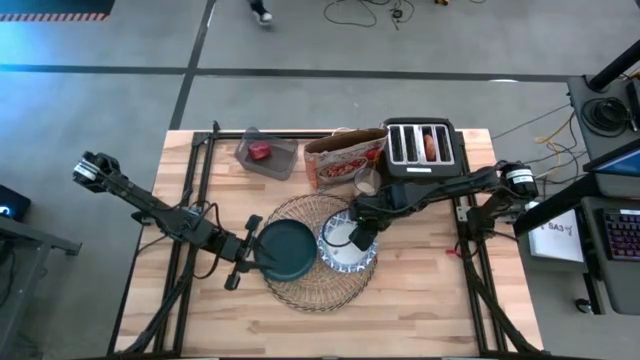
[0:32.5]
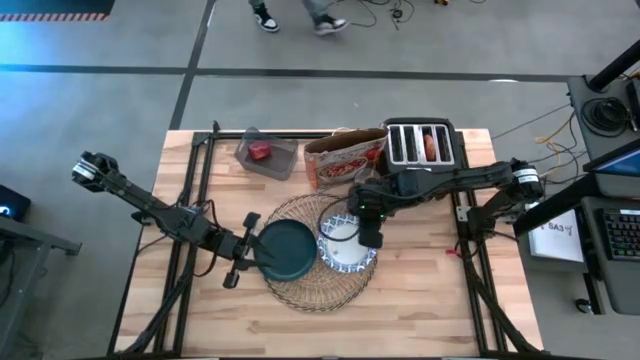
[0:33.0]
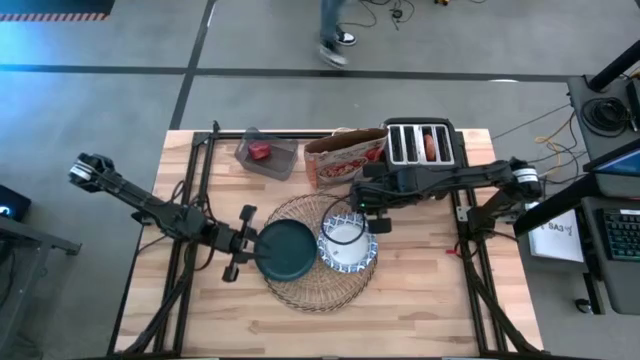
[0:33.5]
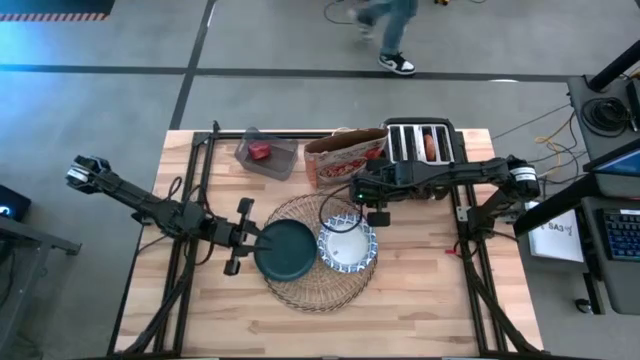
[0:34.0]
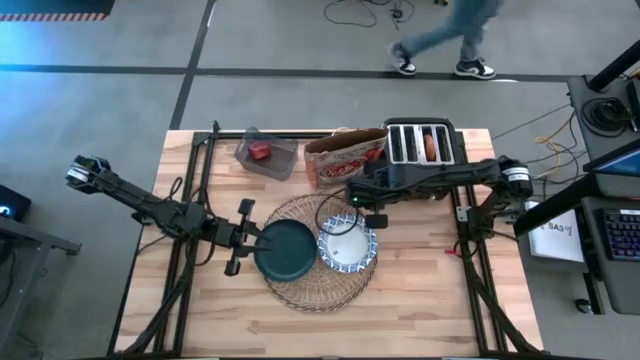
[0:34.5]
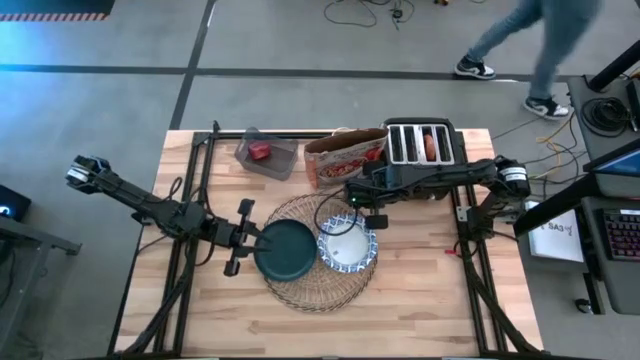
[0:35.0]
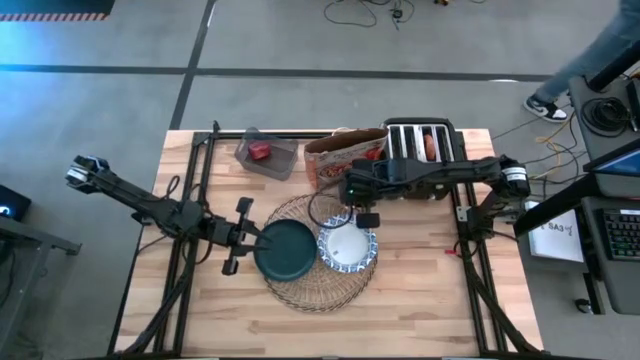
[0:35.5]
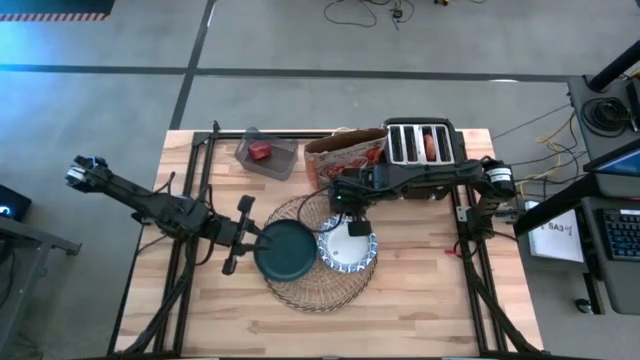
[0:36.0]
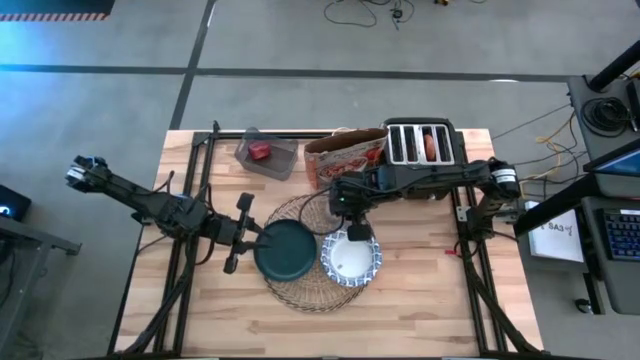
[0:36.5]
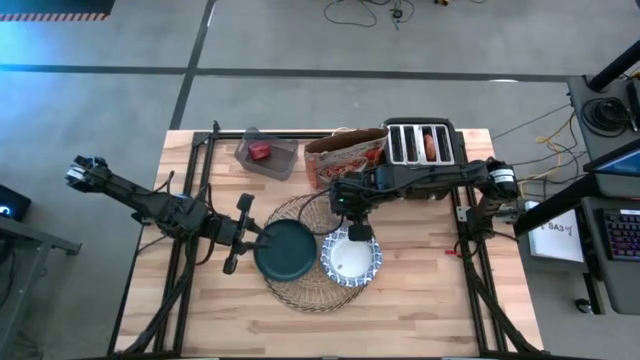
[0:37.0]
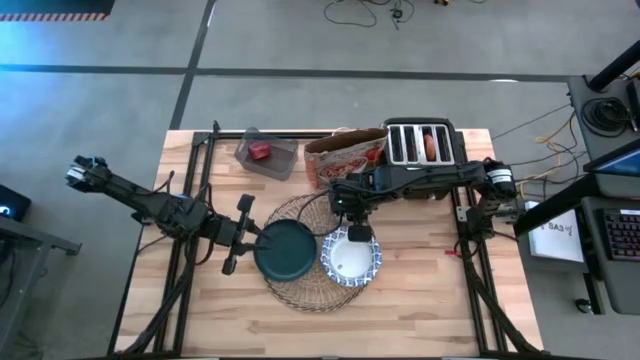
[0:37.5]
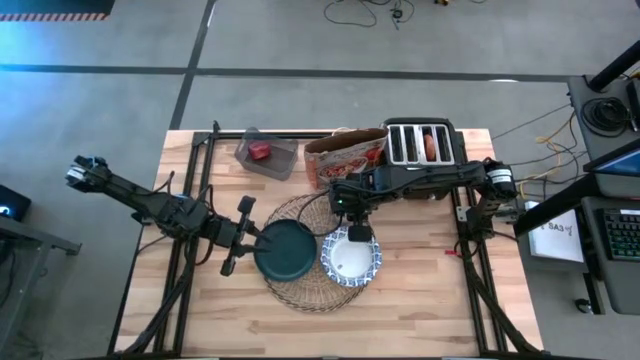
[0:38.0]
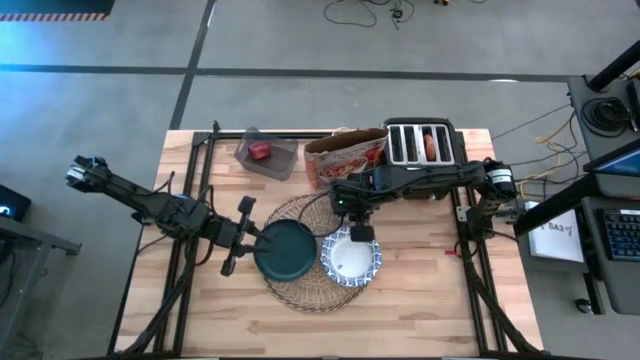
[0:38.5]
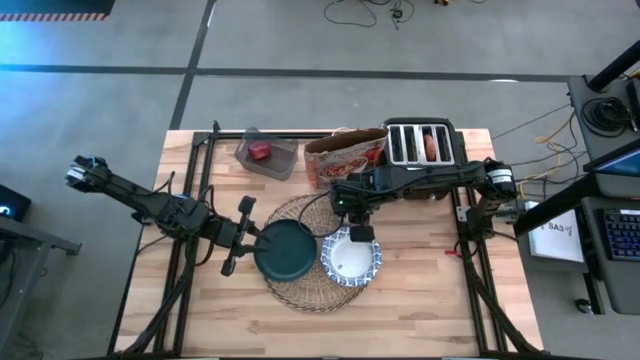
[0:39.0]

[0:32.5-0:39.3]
Task: Arrange a breakfast setting
Put the transparent cup on the brown table mat

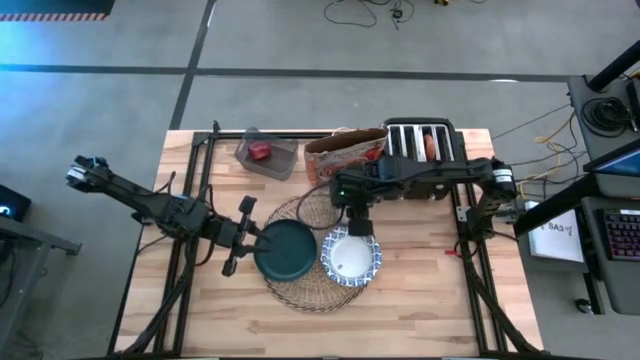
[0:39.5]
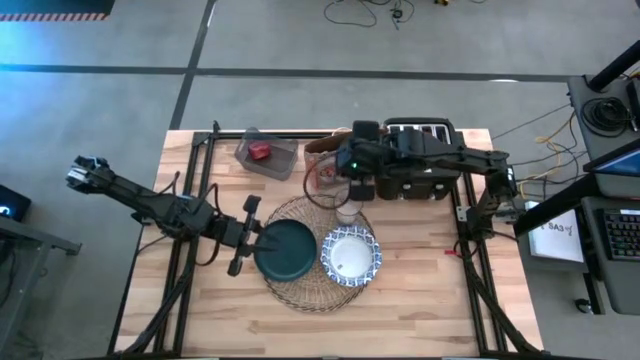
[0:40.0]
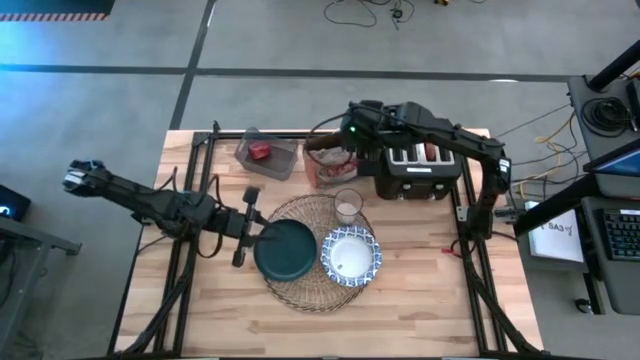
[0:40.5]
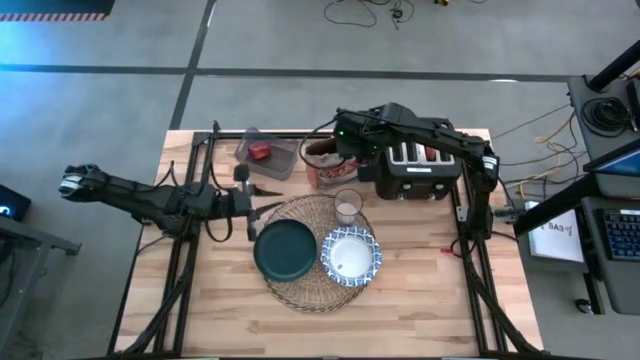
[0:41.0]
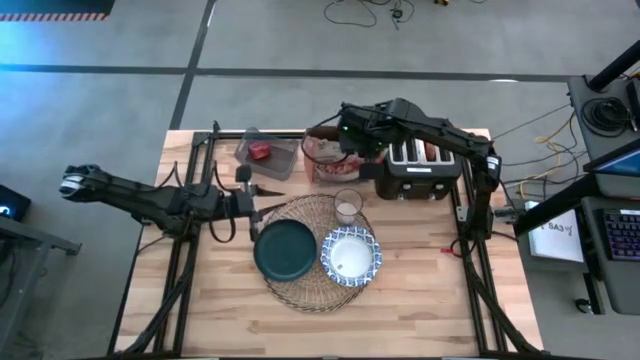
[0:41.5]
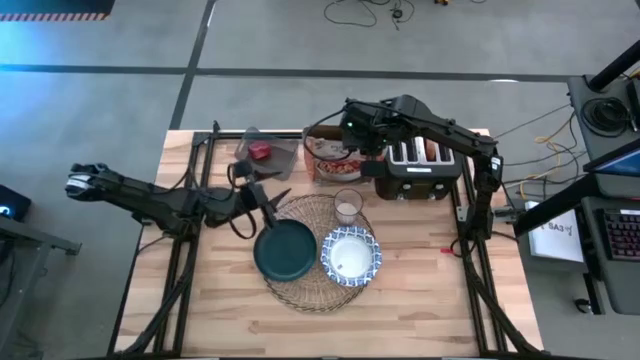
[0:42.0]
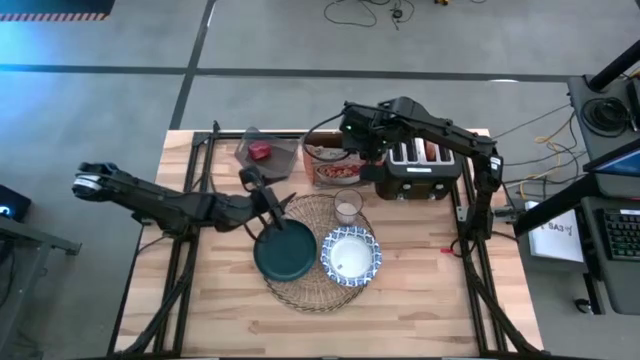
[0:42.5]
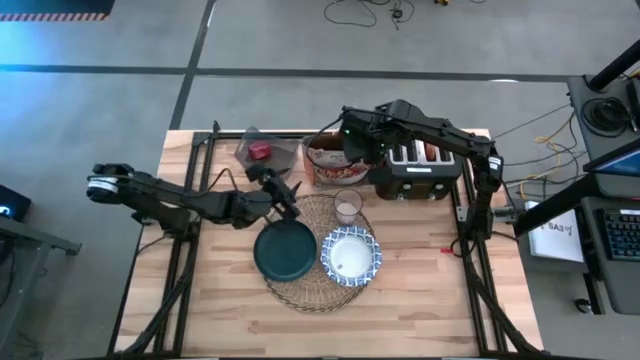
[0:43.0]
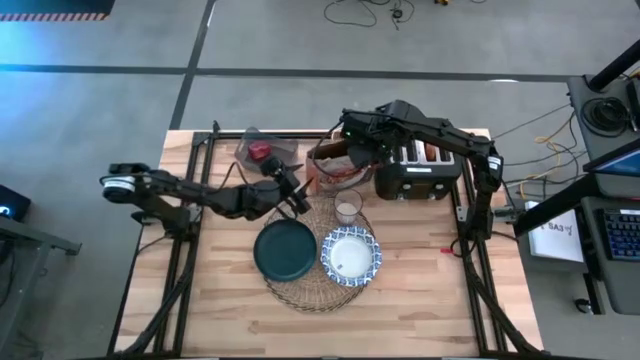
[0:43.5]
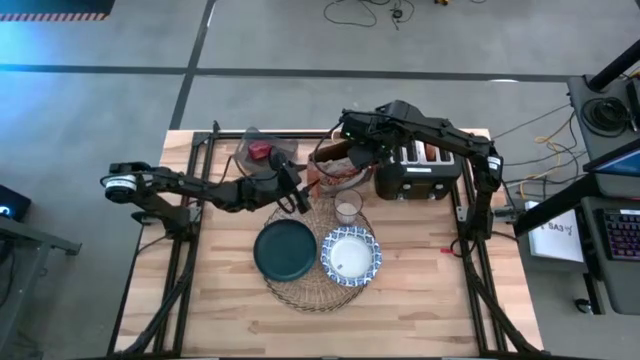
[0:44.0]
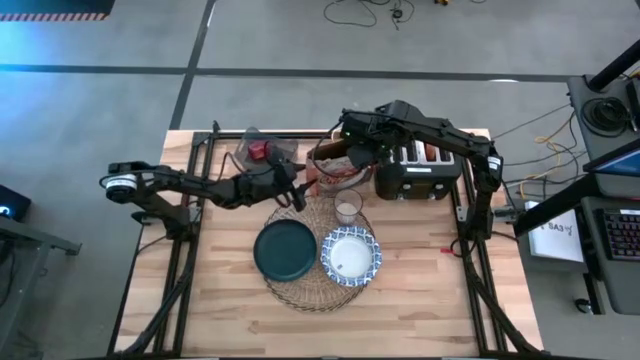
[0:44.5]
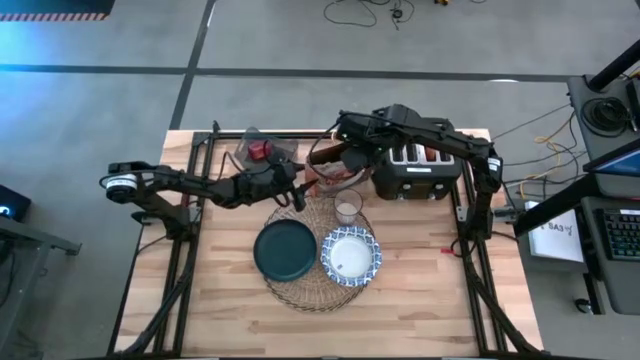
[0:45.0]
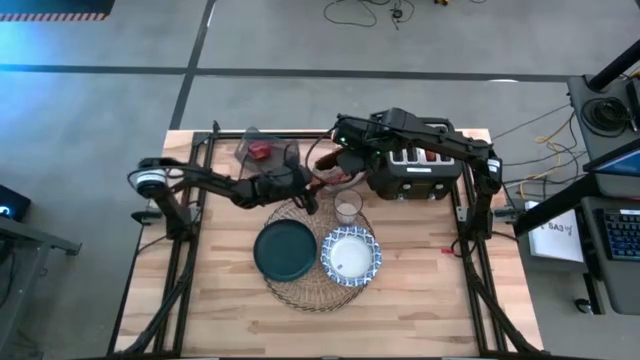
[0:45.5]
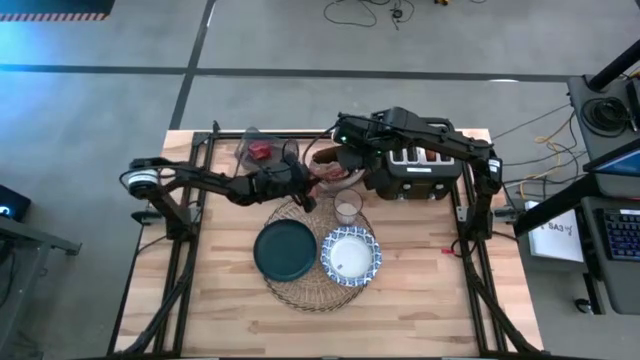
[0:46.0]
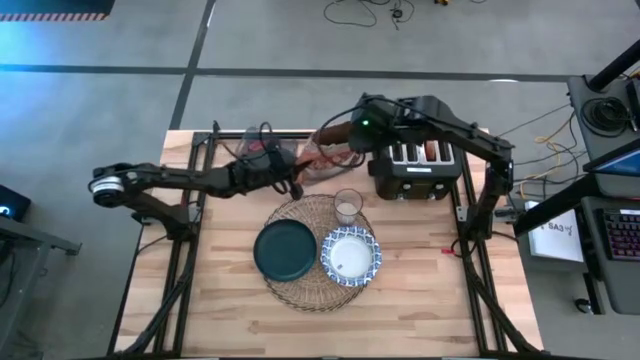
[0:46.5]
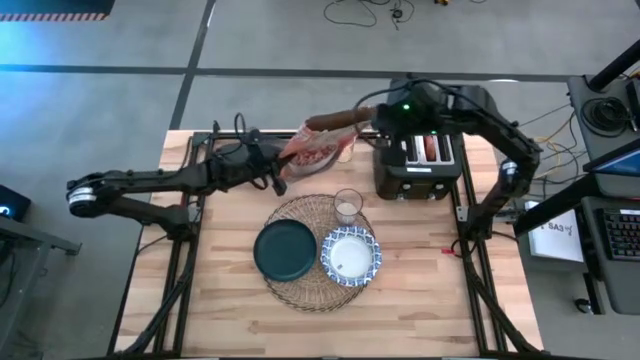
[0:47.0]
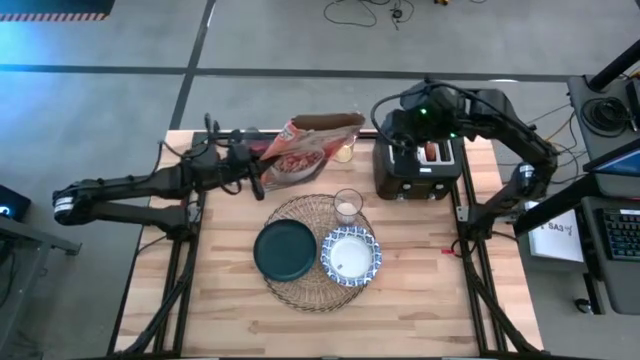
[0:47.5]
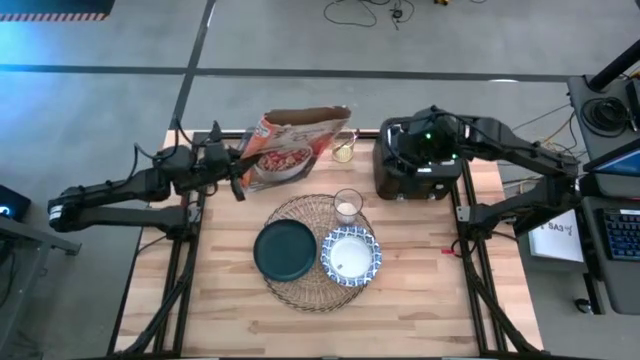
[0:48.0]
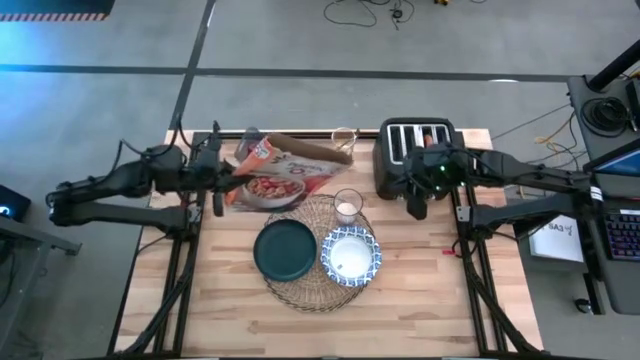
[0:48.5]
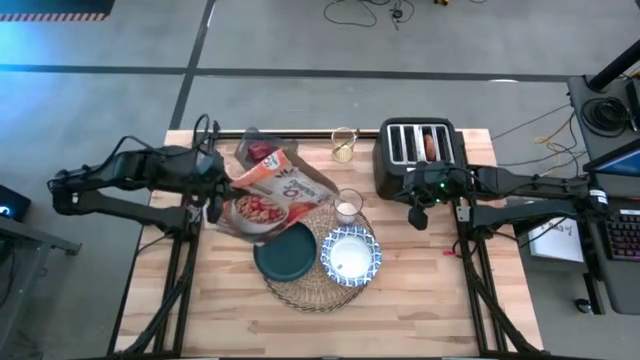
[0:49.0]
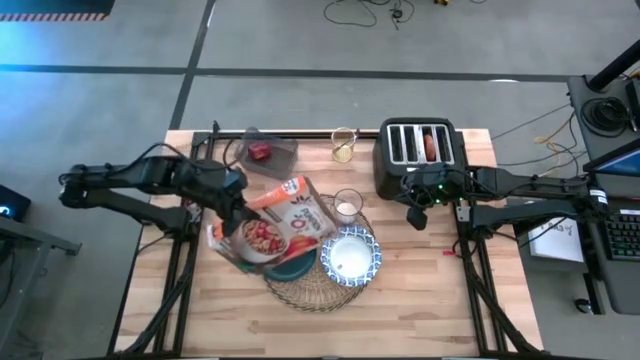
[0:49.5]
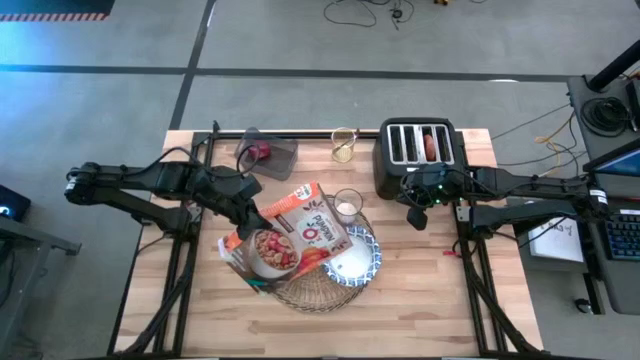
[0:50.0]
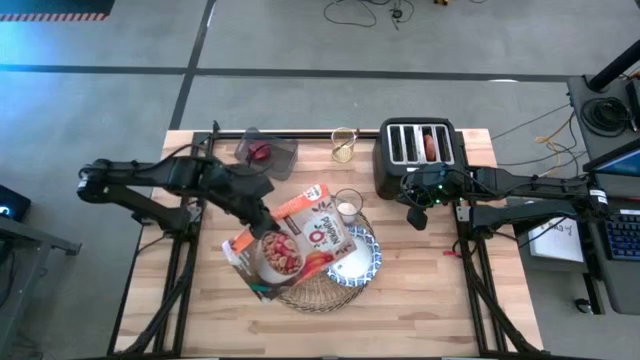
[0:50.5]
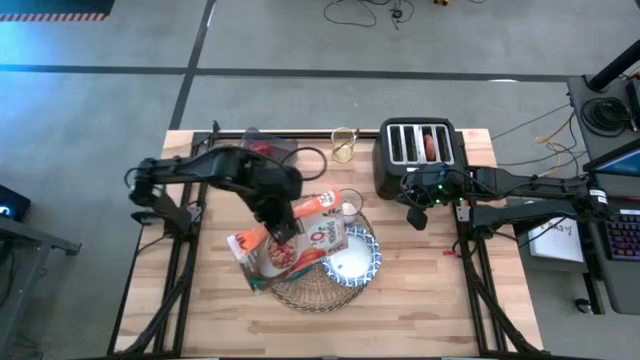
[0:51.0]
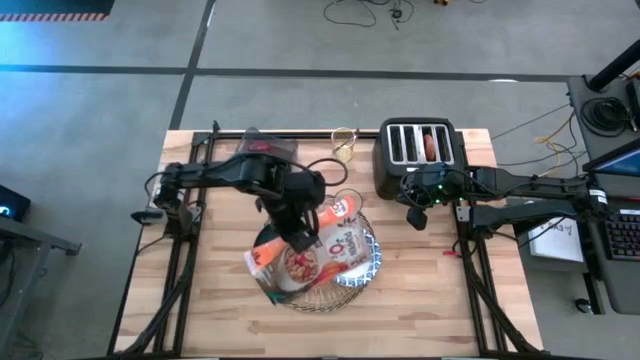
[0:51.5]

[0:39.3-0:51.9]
Pour the cereal into the white patterned bowl

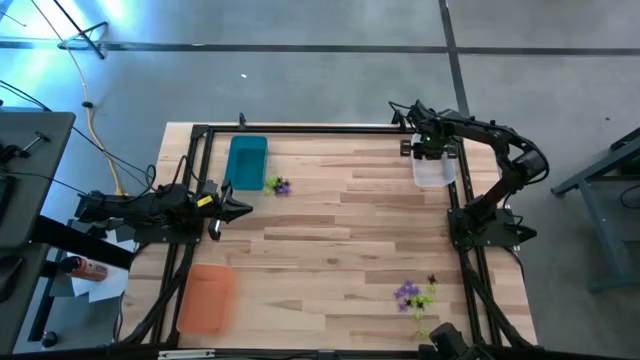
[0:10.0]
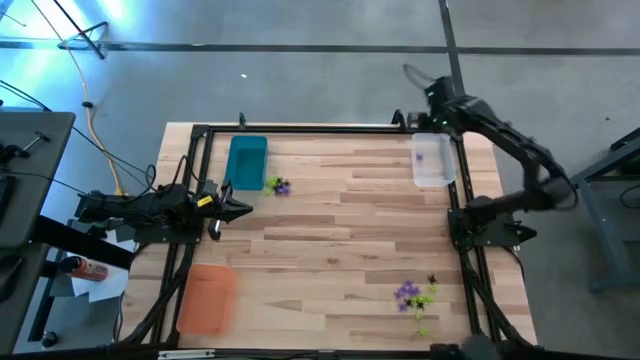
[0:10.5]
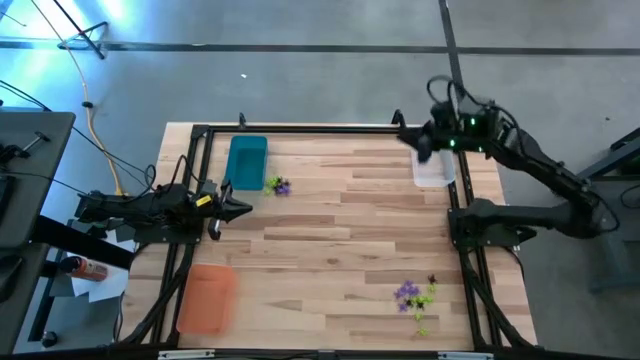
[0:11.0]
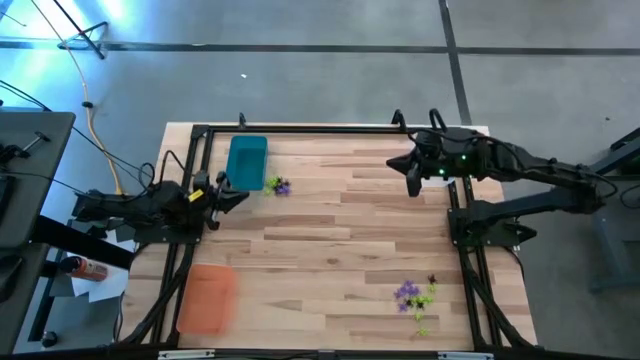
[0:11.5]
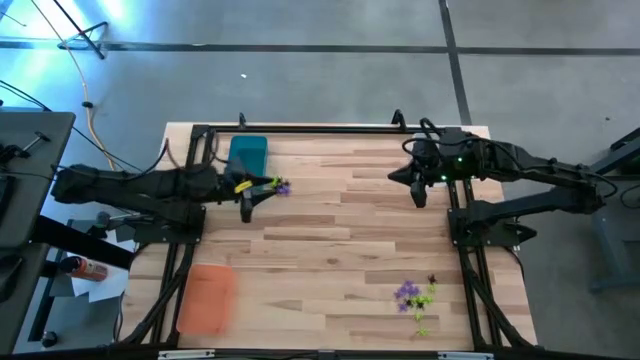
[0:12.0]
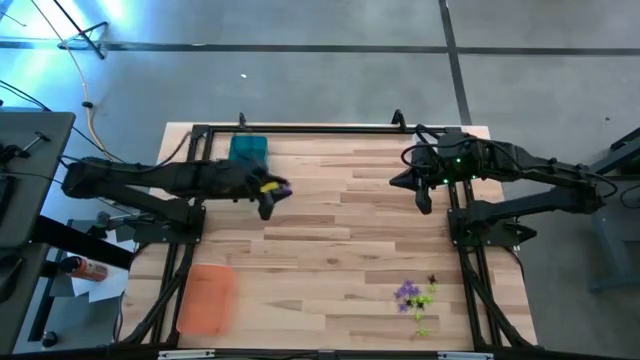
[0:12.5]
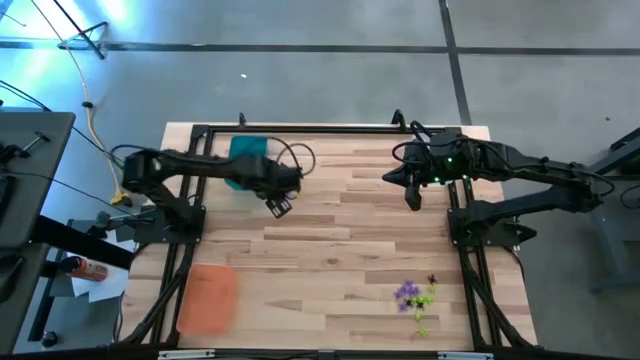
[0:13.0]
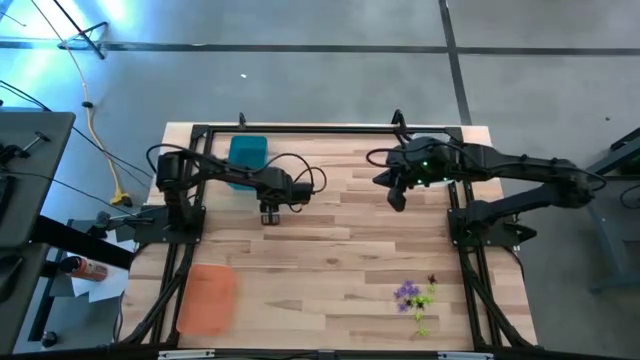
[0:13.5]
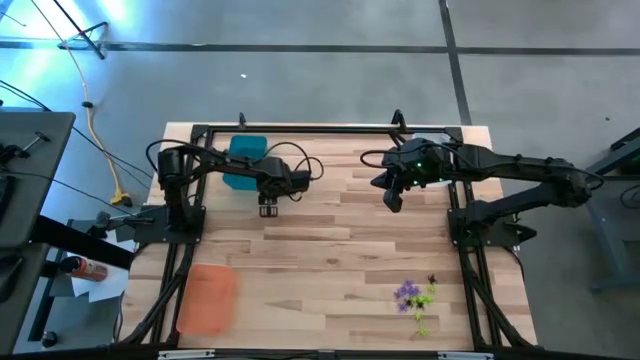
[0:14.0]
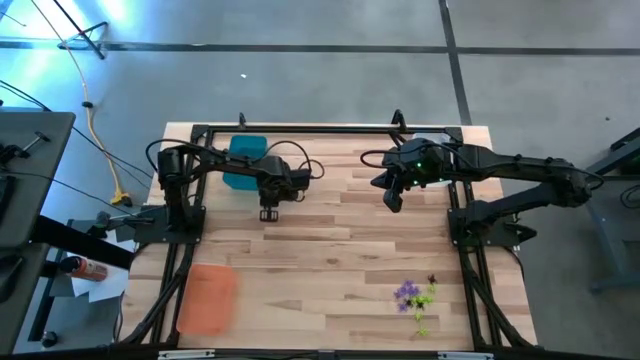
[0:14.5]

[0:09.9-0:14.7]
Task: Sort Halloween decoration
Put the green spider toy into the blue bin
